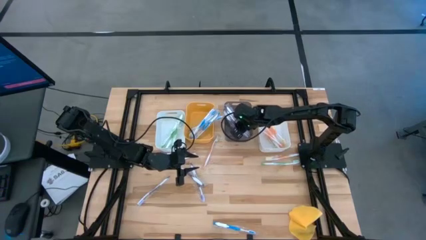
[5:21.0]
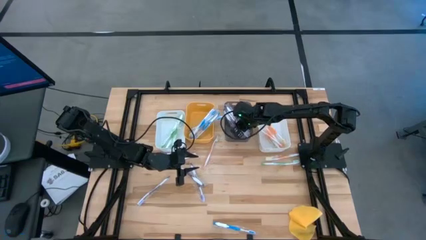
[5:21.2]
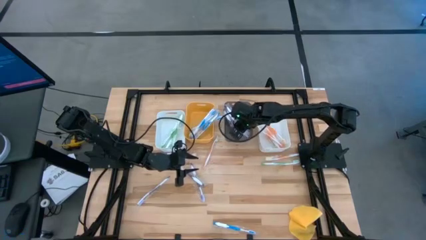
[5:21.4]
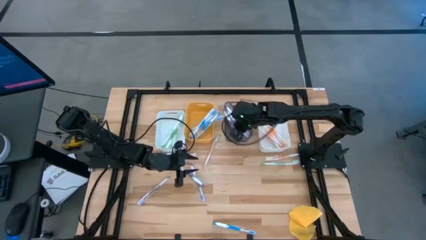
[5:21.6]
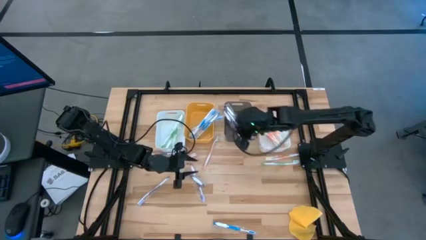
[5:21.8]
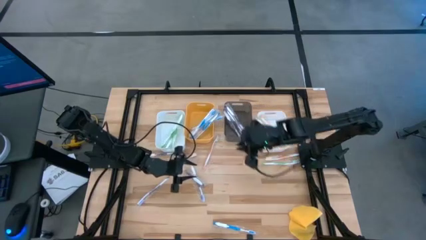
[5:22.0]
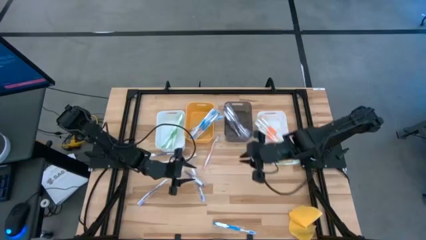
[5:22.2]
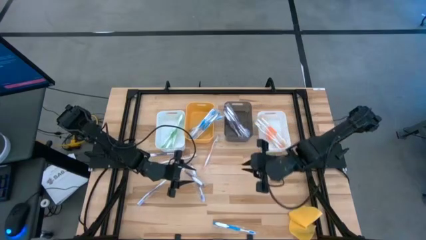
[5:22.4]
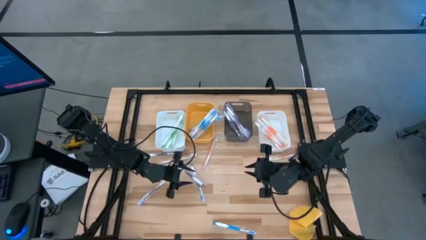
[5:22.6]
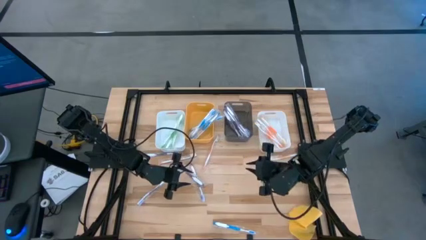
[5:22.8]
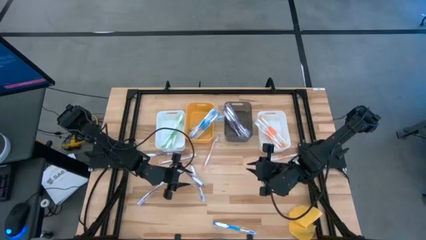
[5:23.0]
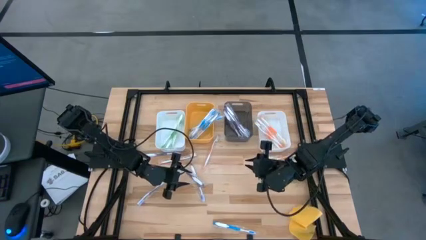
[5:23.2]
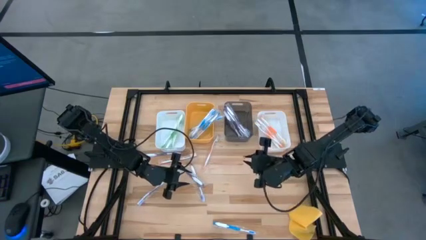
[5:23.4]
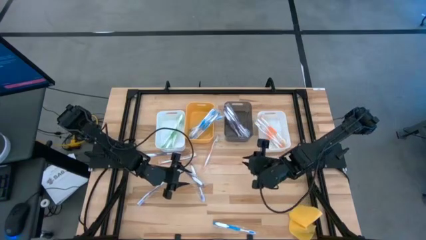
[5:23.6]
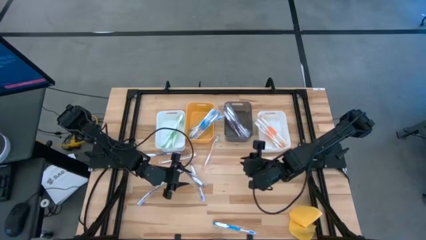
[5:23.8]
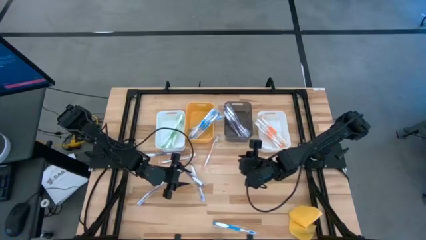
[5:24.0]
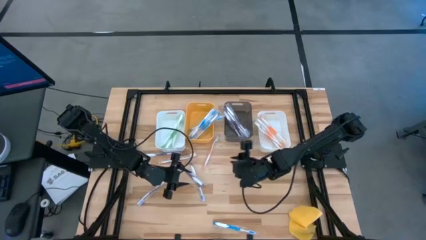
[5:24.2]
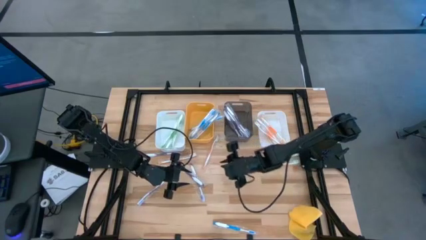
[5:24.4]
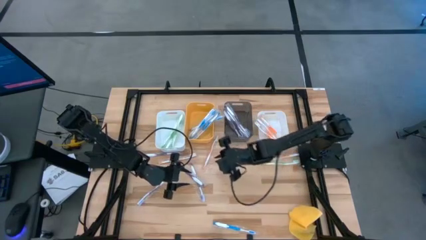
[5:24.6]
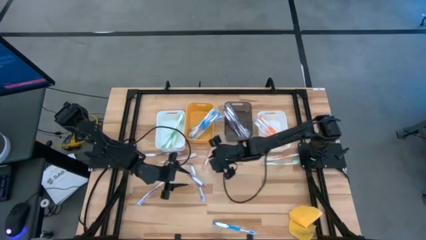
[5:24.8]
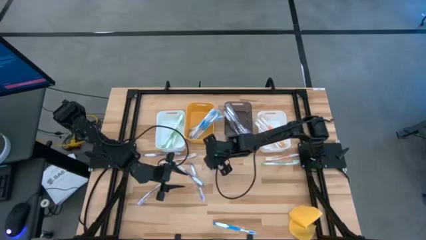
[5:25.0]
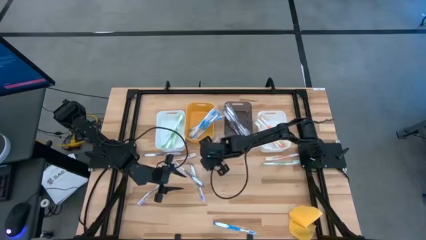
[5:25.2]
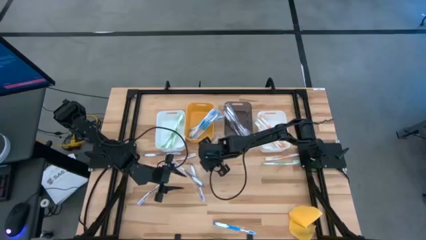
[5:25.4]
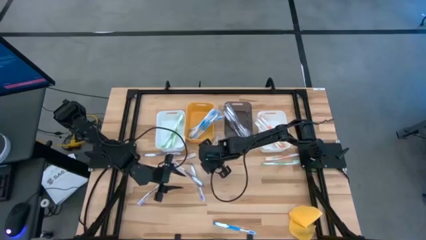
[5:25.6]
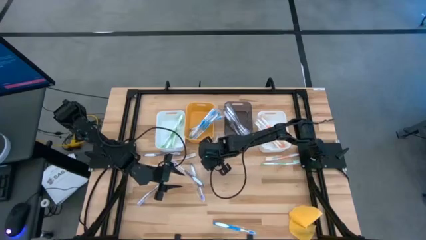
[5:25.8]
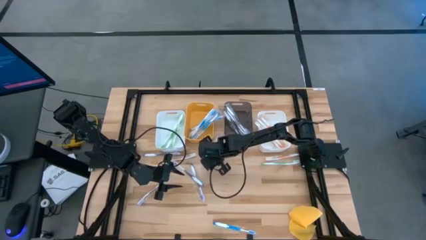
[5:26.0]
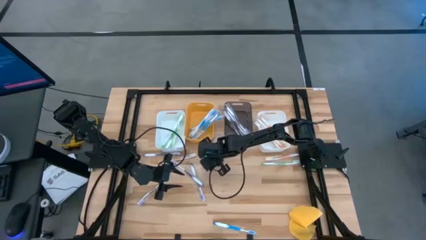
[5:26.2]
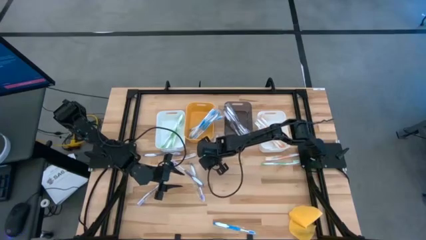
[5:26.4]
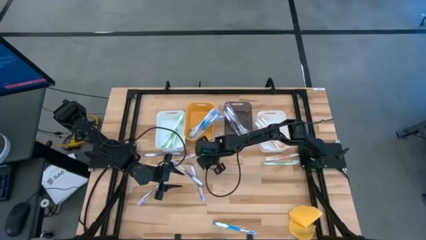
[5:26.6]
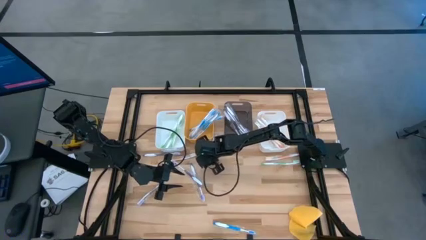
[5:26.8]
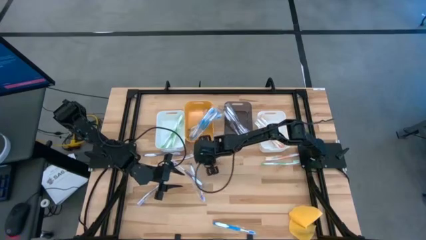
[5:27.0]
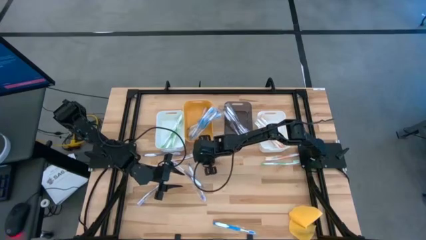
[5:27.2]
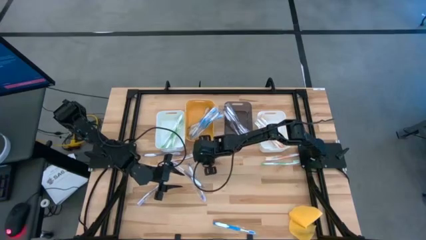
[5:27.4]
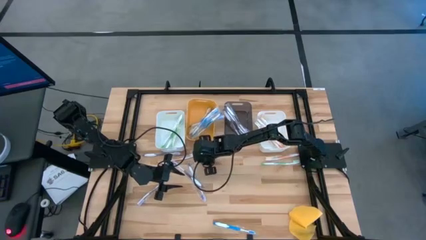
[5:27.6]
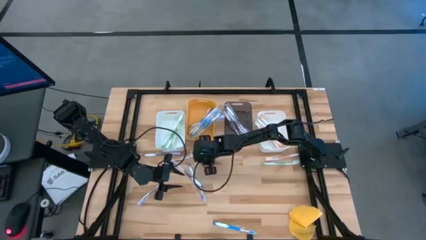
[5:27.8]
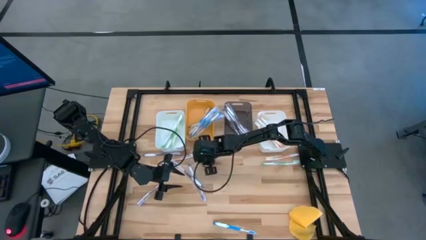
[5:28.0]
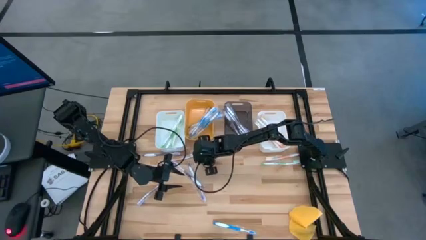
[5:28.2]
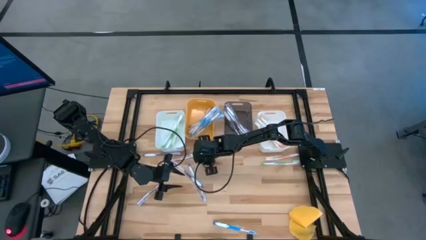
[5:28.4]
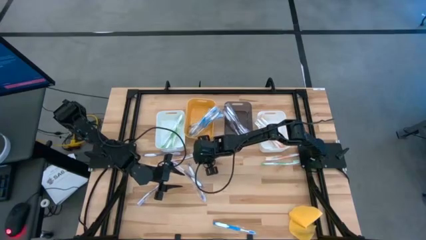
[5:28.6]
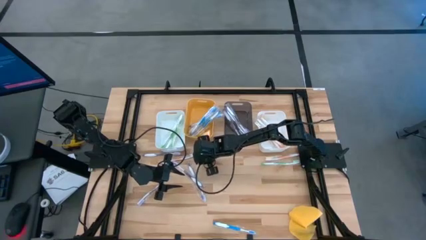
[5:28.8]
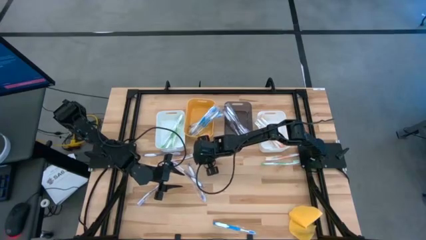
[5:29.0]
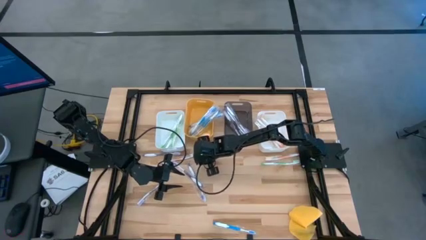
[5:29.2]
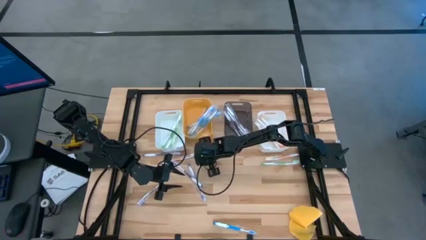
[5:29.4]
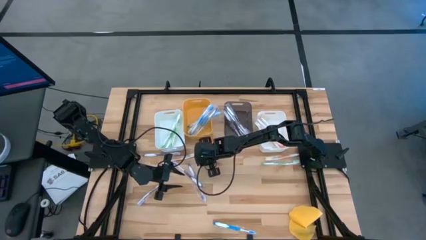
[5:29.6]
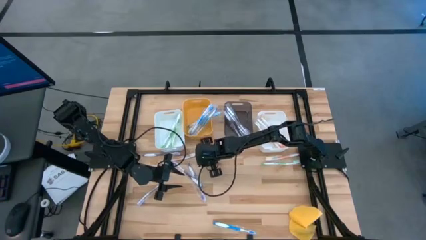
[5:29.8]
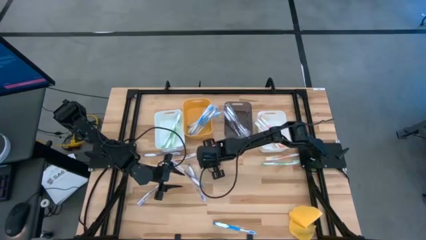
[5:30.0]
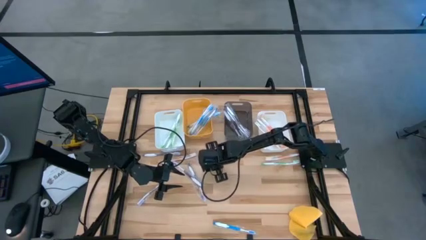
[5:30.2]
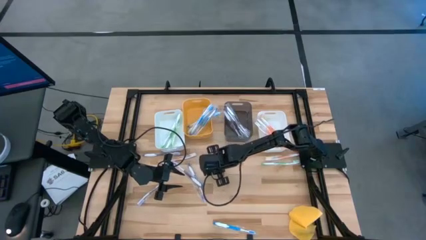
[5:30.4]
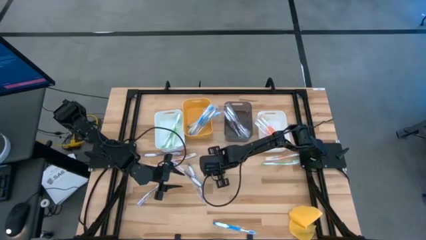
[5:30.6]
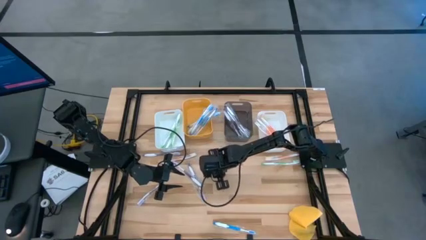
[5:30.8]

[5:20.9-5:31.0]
Task: Pick & Place Toothbrushes
Put the middle orange toothbrush into the right white bin

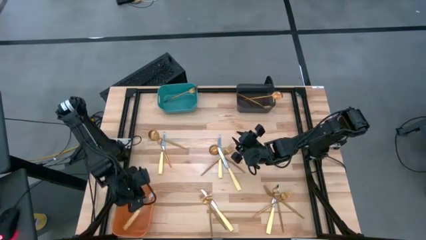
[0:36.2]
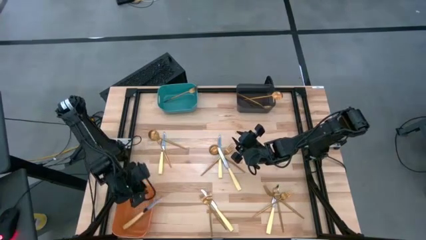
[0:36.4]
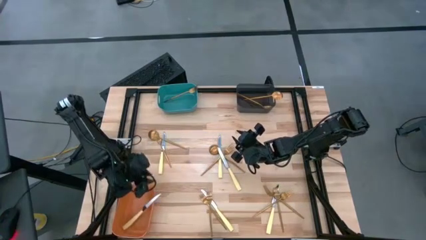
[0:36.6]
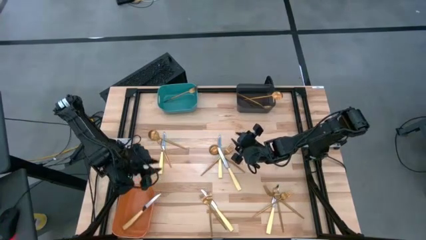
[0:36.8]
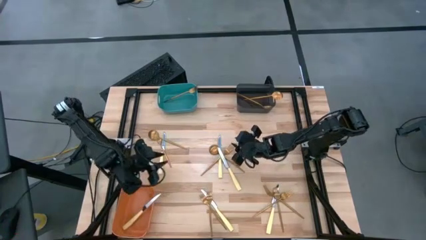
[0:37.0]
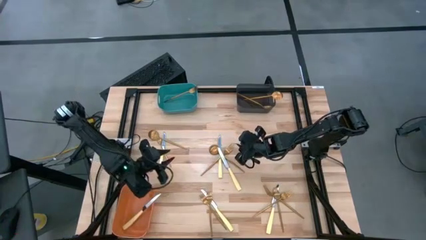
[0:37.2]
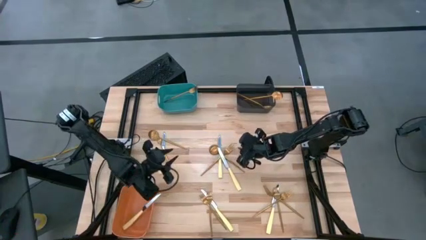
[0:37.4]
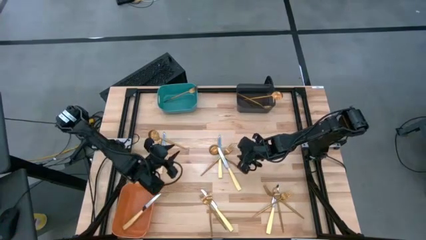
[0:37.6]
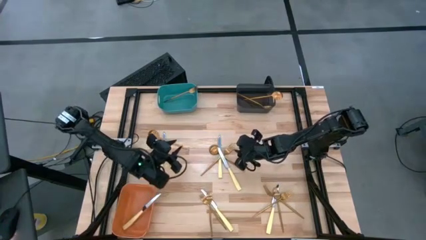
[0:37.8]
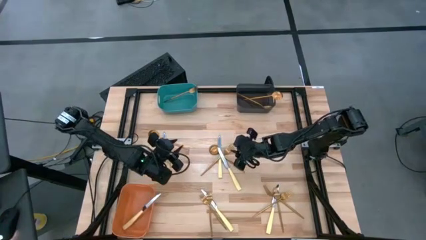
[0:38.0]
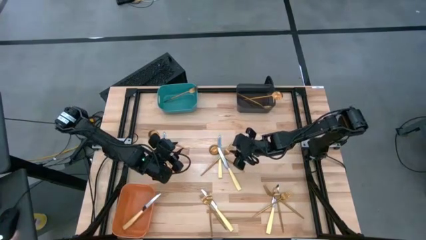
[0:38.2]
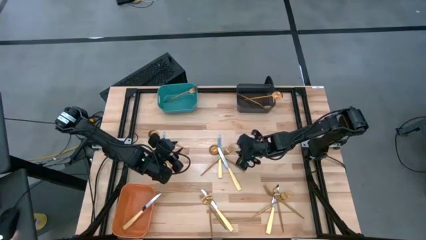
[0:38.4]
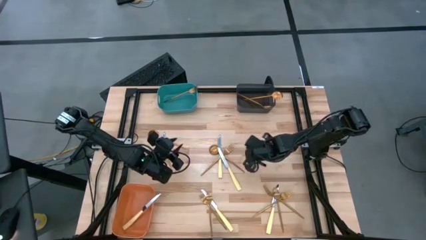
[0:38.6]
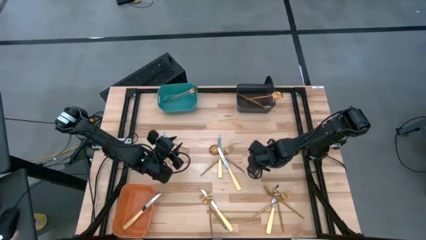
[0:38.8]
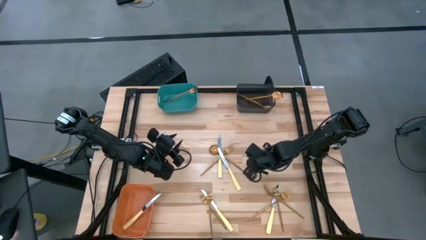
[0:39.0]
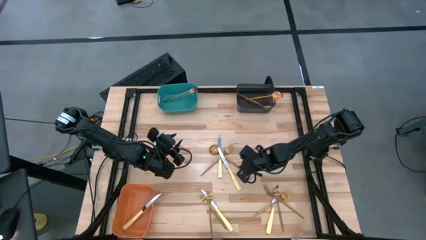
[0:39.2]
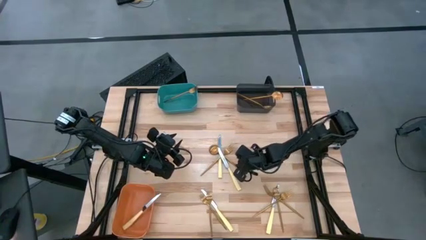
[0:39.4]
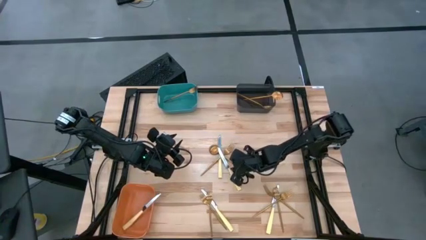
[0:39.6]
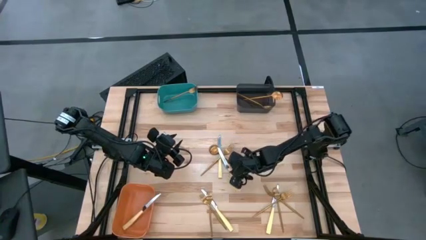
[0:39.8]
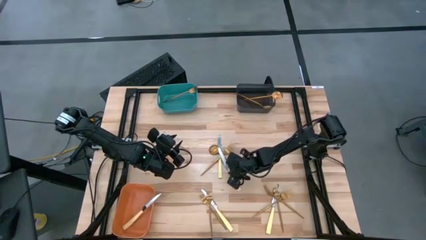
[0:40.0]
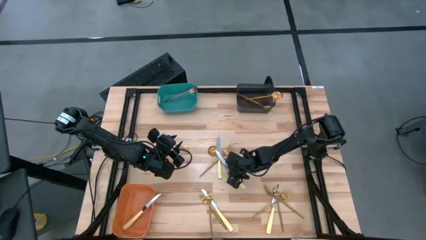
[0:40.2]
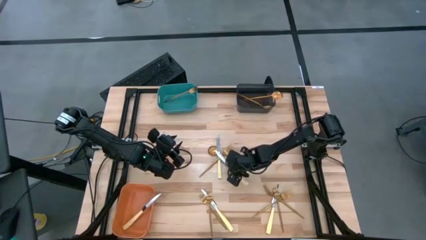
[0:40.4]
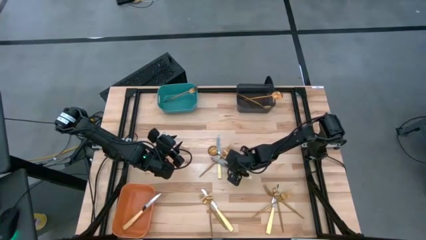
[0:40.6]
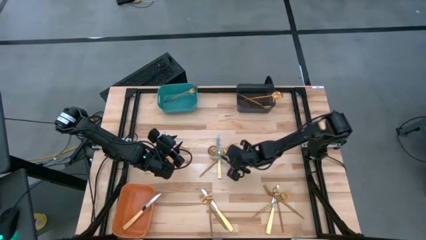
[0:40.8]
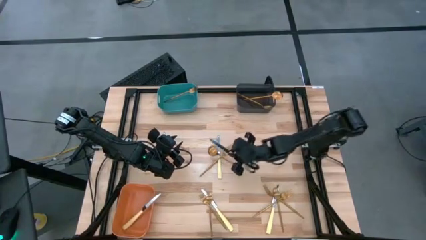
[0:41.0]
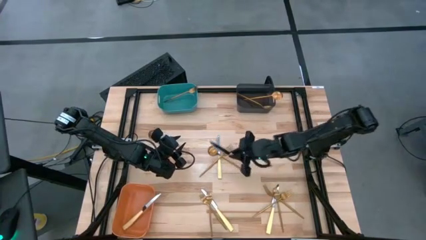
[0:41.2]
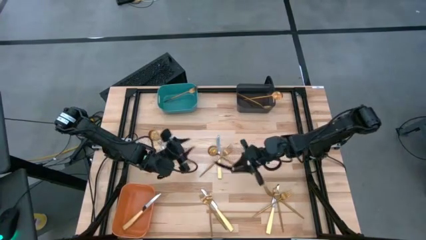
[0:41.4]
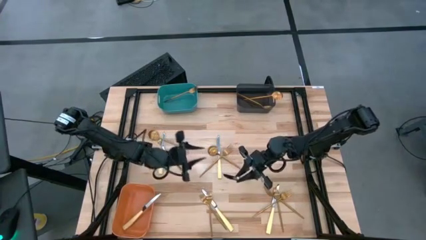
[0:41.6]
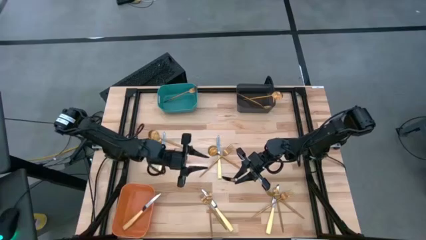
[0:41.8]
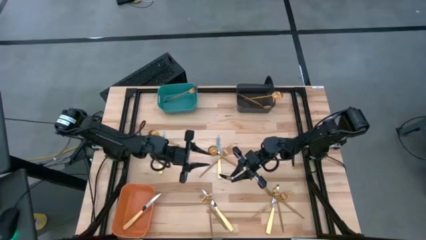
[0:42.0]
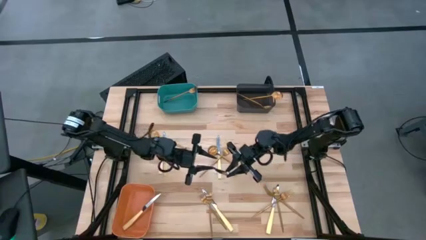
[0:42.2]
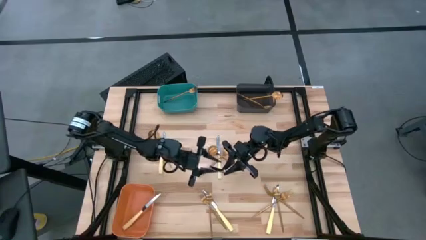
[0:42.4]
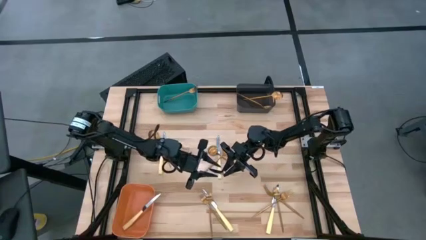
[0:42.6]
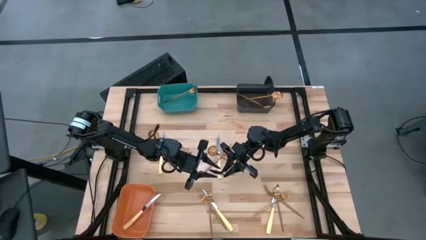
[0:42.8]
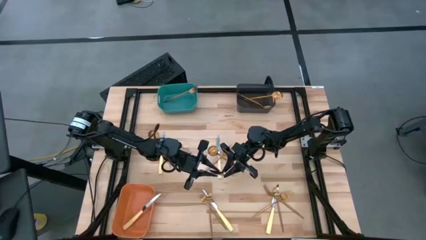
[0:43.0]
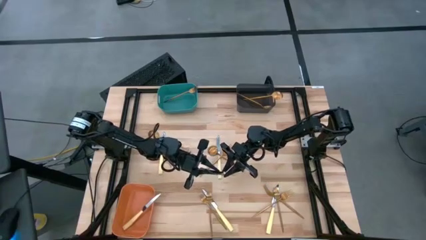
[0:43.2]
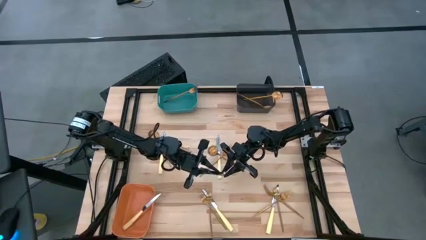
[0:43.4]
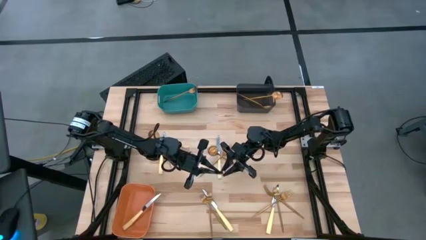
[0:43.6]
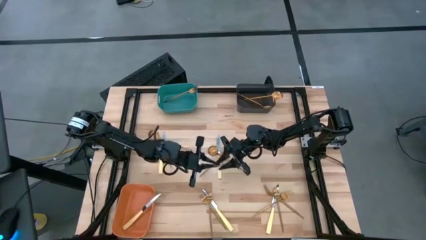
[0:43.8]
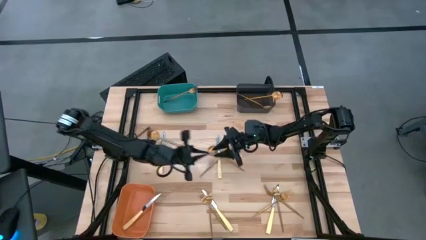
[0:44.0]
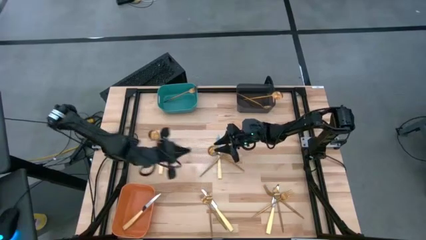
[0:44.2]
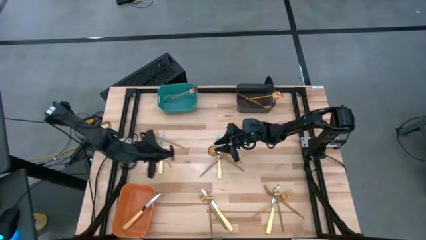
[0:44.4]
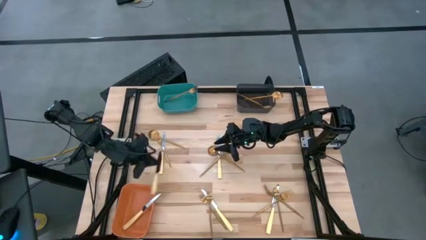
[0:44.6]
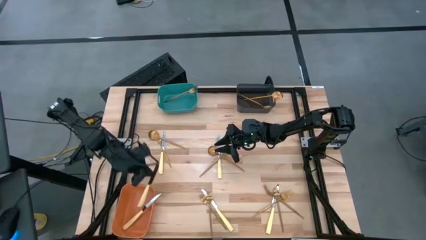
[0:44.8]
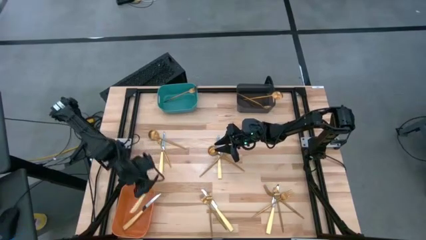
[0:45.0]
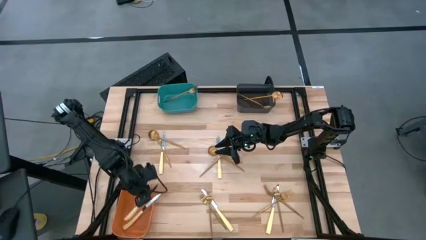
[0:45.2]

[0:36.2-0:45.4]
Task: Sort silverware by color (type)
Put the yellow table knife into the orange bin
